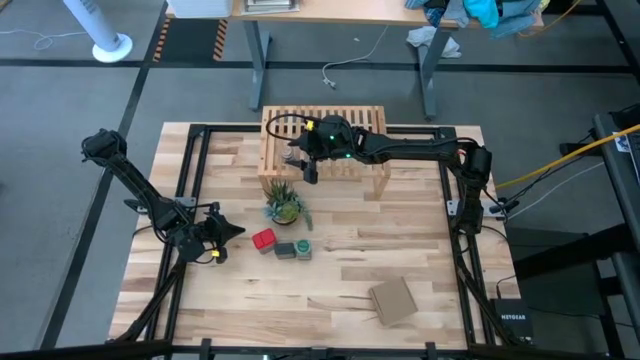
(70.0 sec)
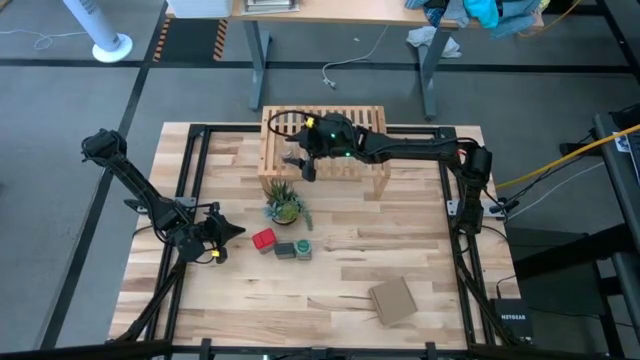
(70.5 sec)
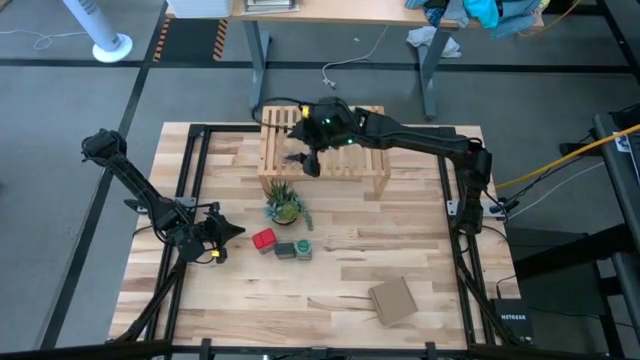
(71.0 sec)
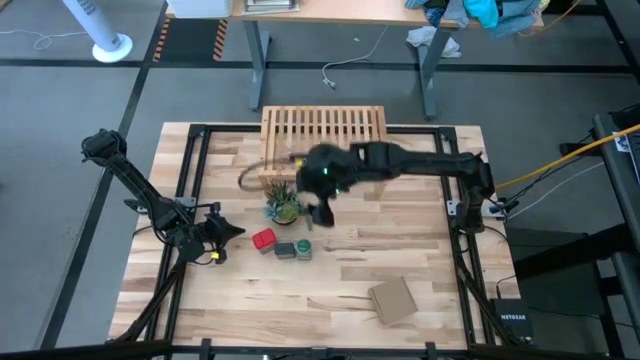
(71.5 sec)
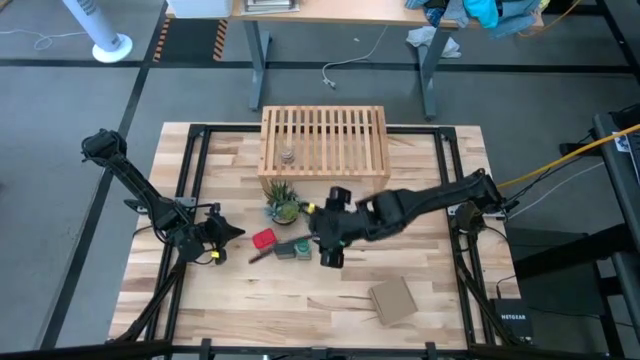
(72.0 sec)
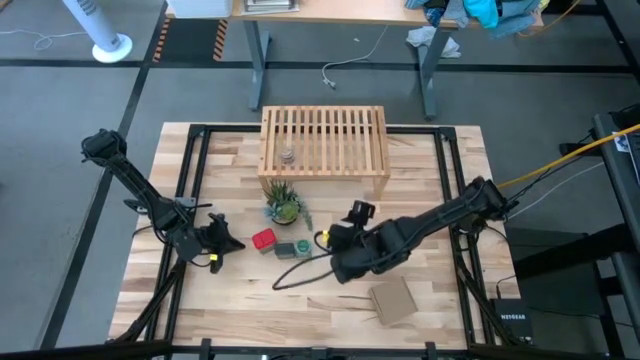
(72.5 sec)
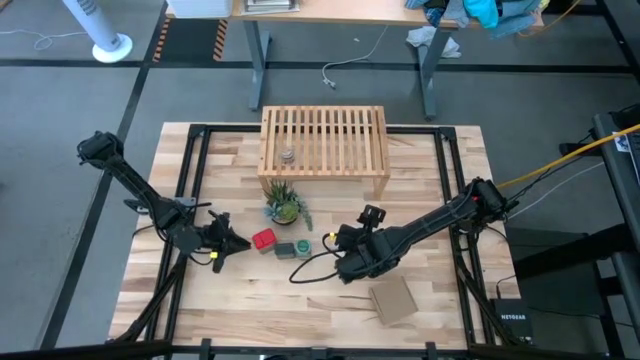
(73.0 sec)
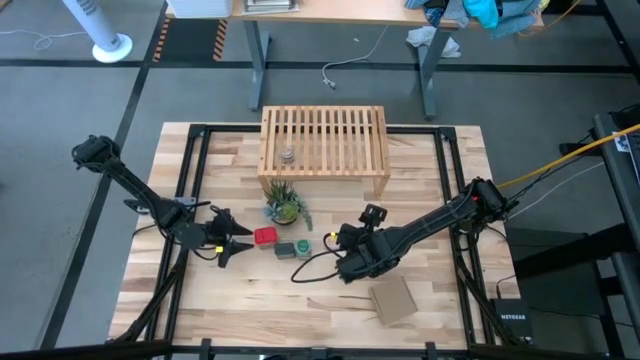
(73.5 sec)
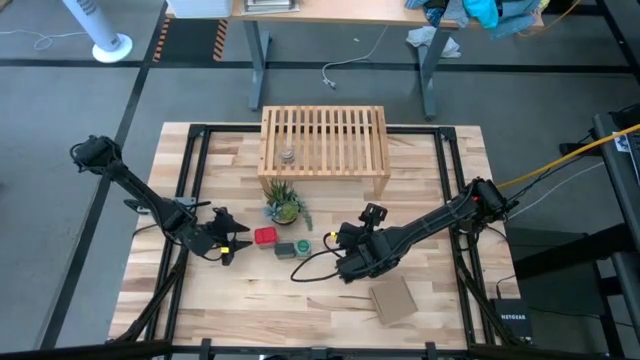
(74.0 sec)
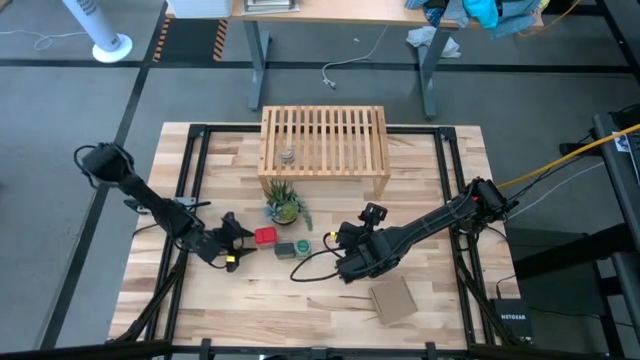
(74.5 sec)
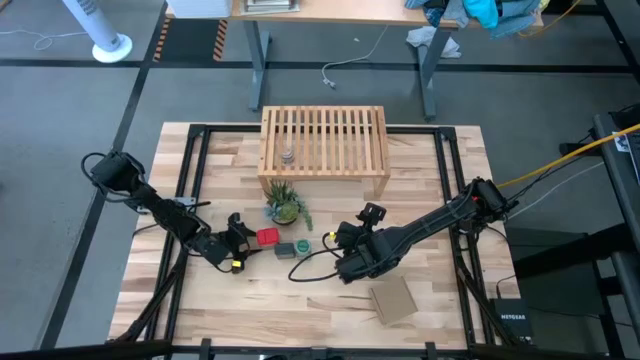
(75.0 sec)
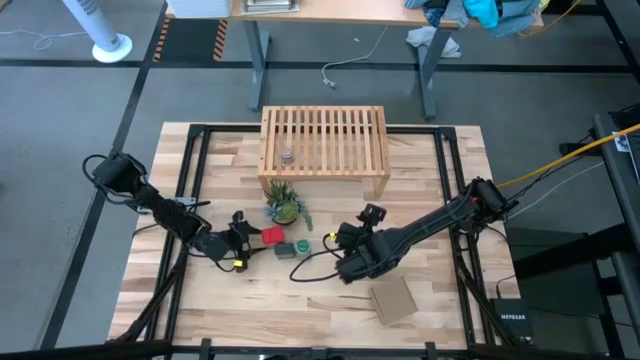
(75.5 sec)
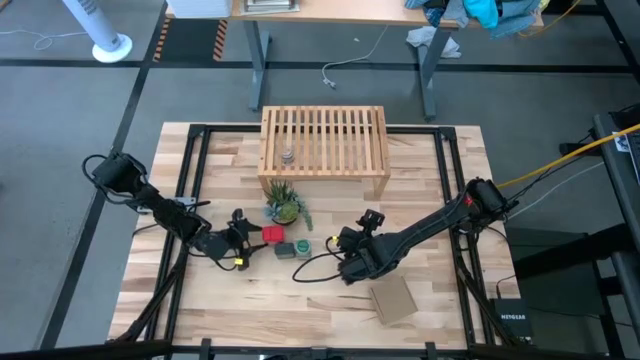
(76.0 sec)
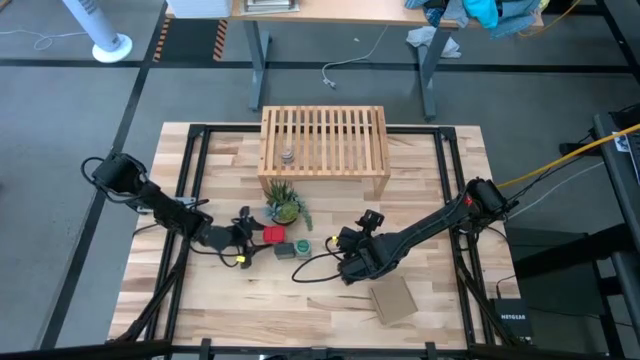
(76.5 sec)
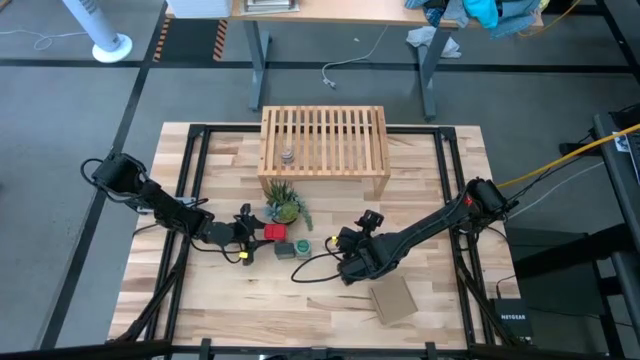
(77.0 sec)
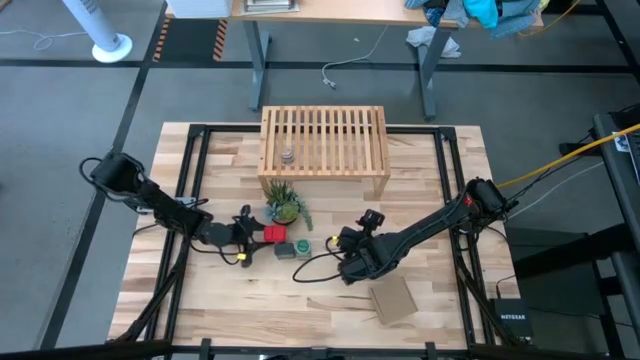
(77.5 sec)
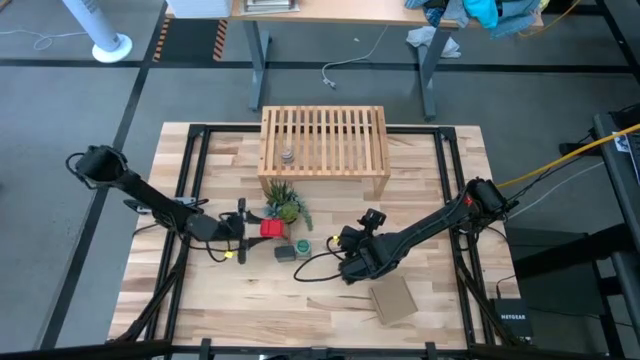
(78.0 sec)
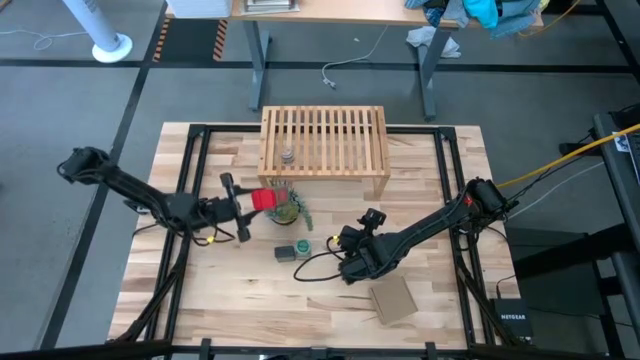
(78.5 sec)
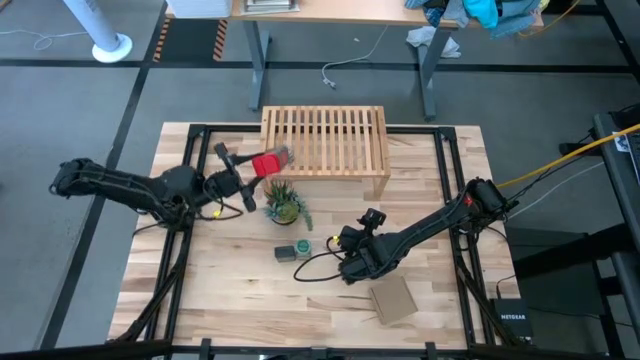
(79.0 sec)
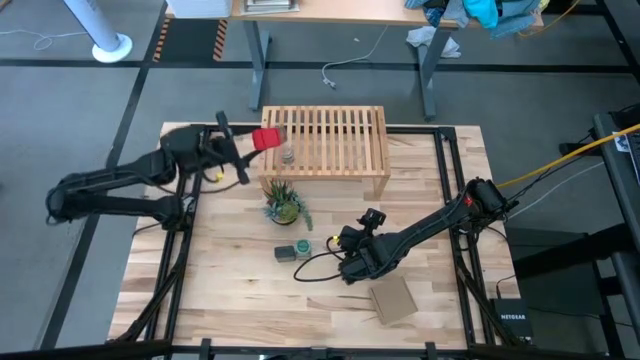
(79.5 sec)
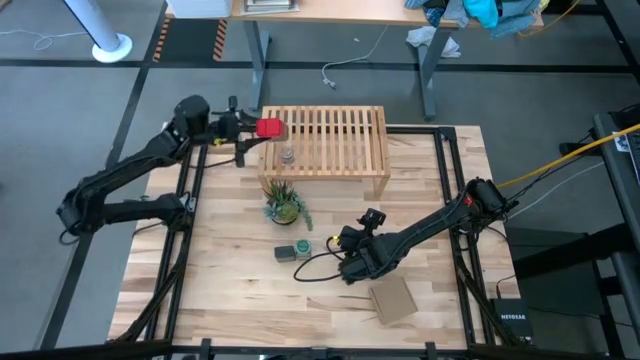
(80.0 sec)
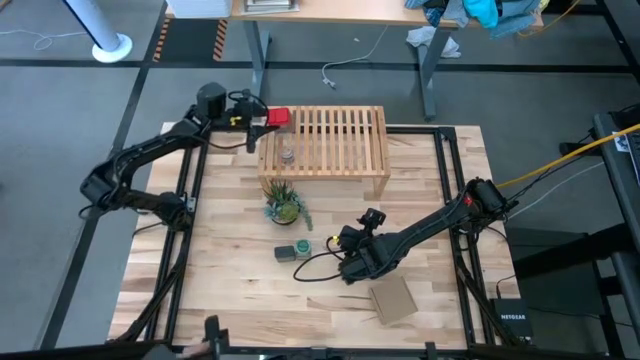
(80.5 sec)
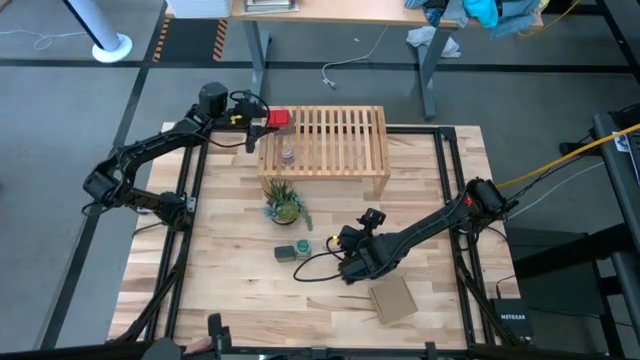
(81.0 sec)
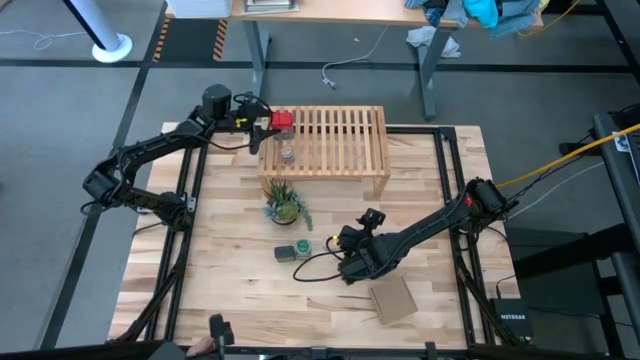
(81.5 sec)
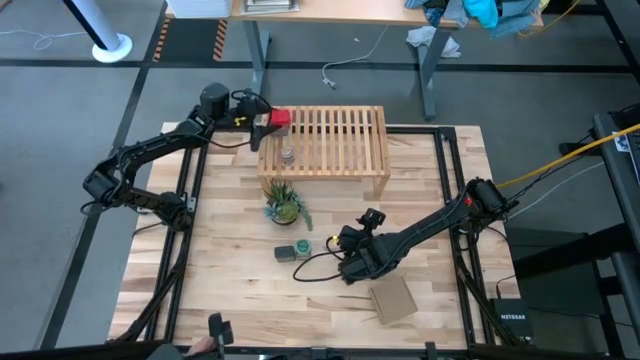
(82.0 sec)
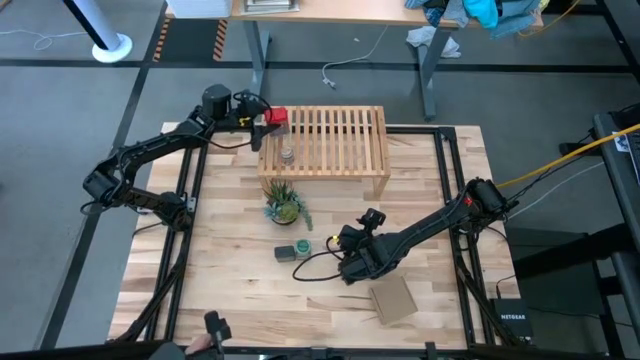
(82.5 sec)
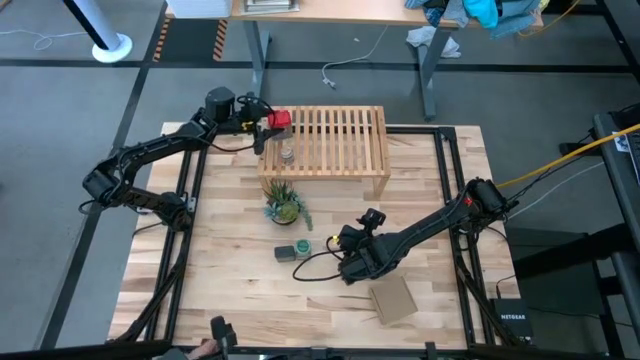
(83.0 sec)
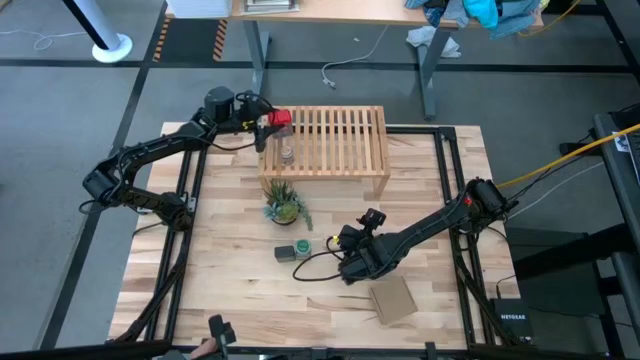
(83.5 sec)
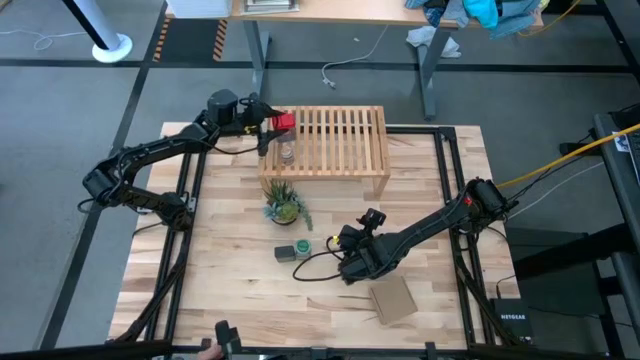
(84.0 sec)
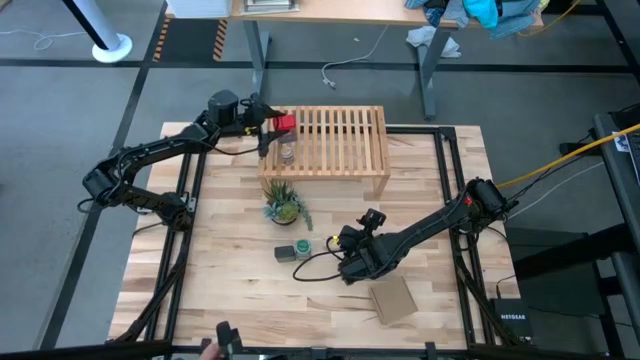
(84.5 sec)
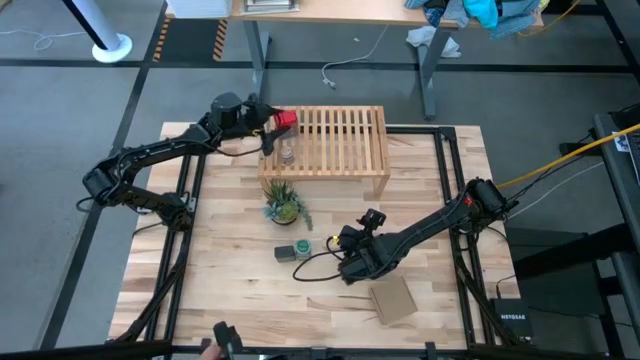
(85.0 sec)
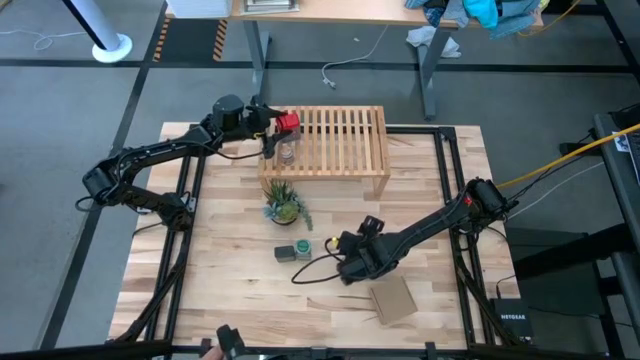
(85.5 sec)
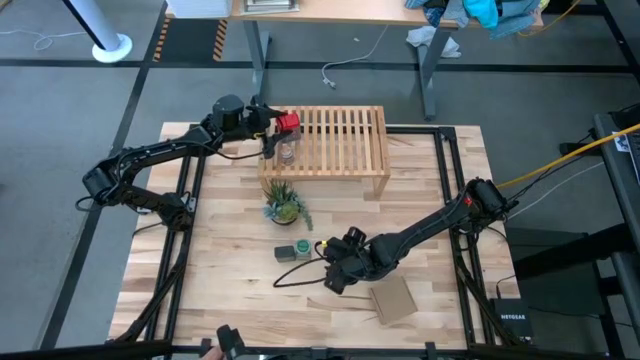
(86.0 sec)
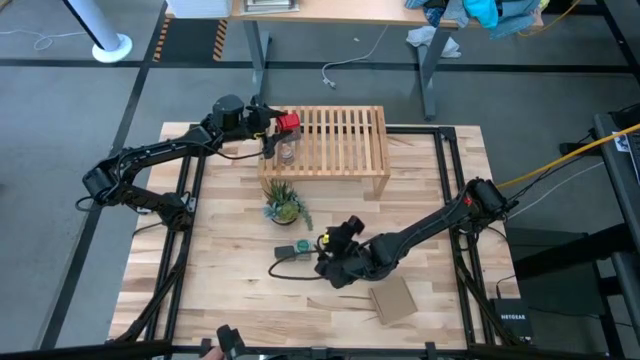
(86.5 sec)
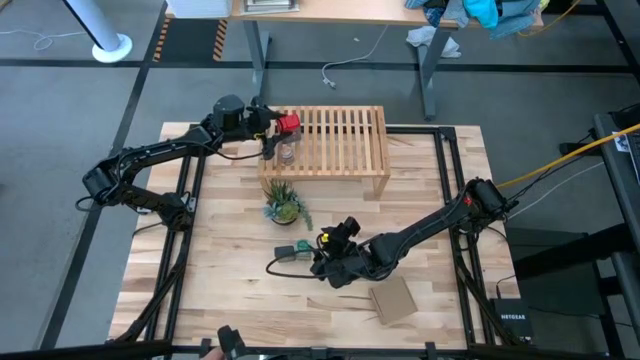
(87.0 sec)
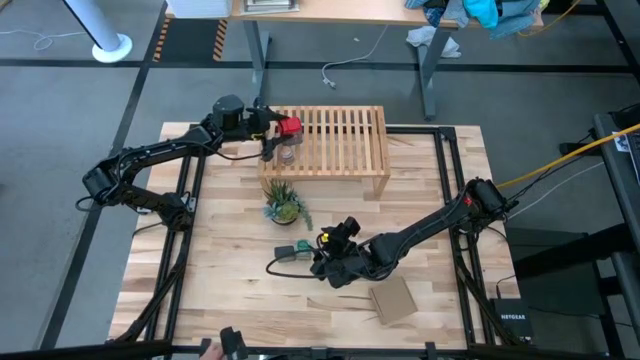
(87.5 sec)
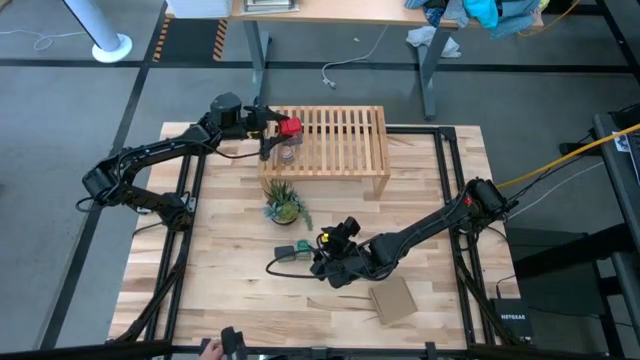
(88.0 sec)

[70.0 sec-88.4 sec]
Task: Shelf spices
Put the red seasoning can on the shelf
